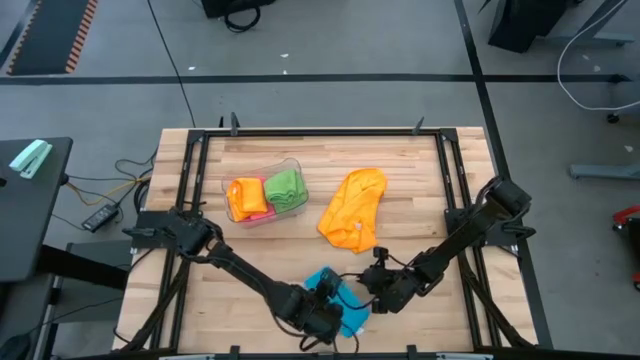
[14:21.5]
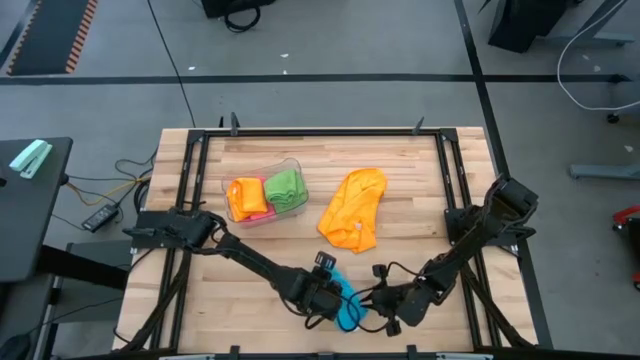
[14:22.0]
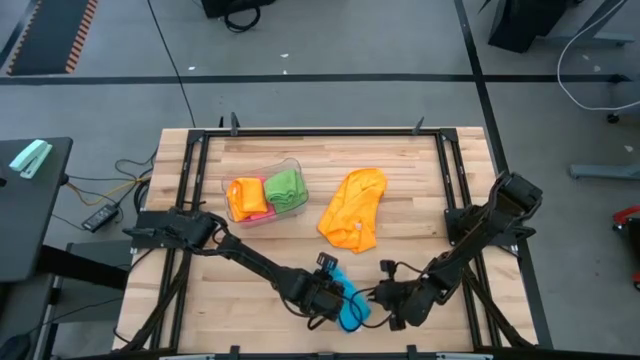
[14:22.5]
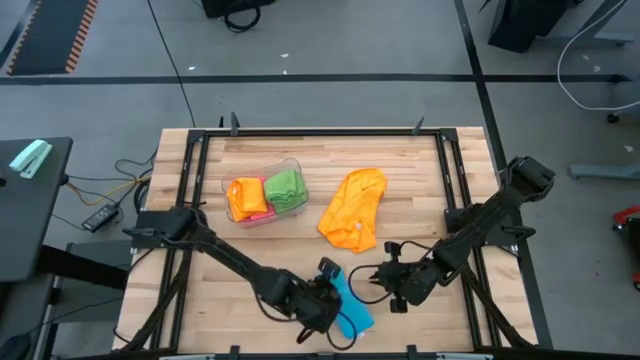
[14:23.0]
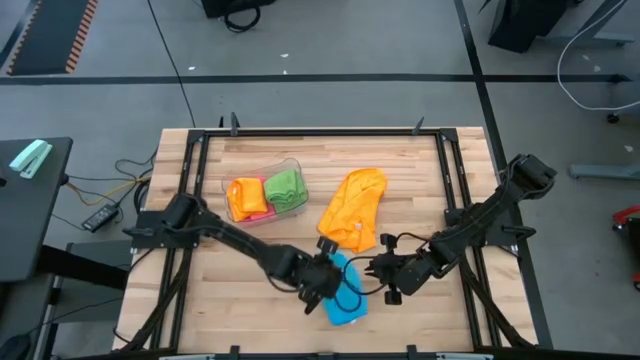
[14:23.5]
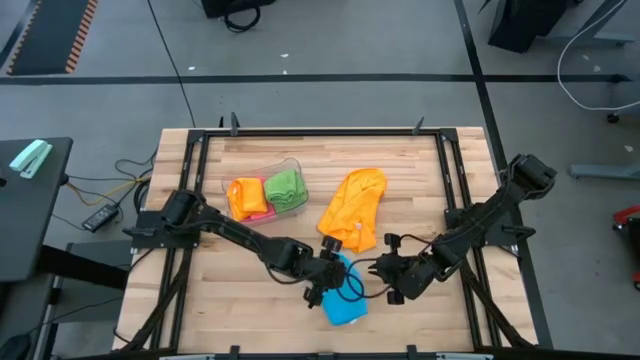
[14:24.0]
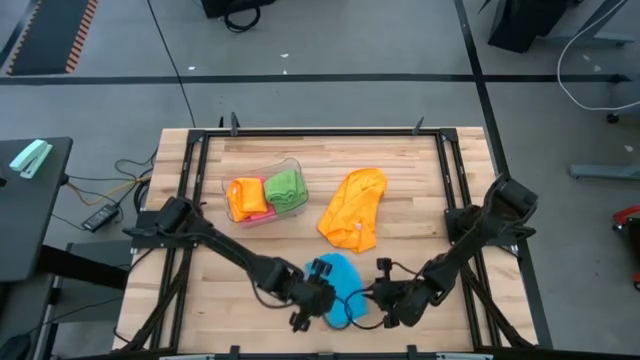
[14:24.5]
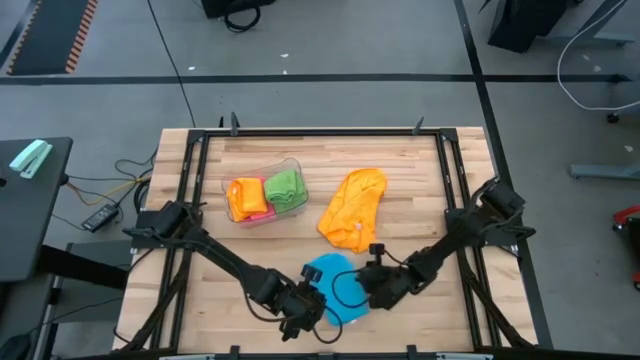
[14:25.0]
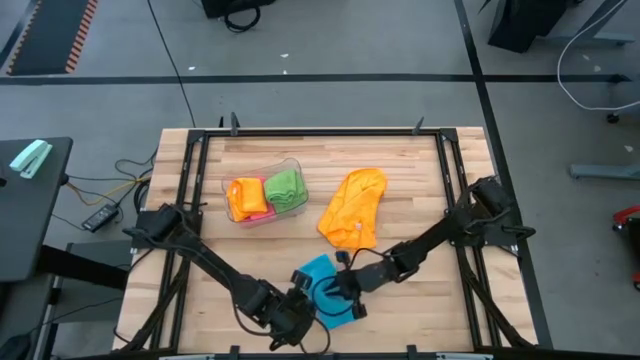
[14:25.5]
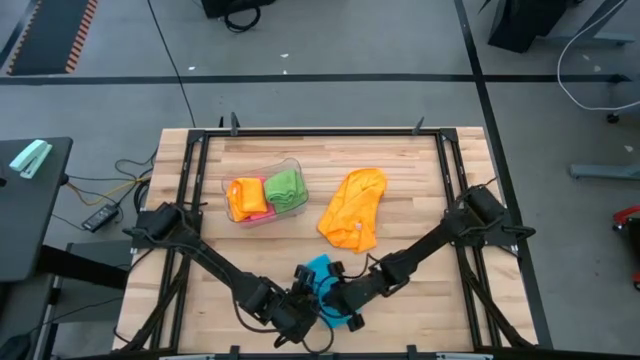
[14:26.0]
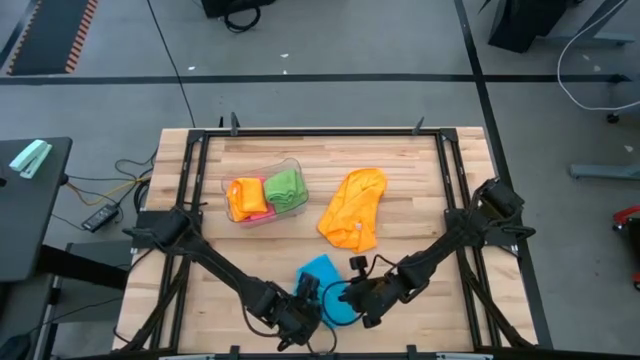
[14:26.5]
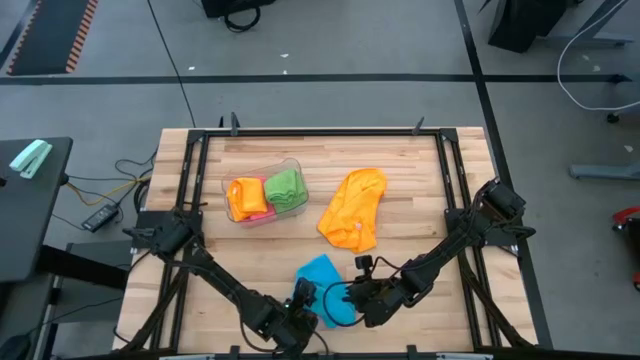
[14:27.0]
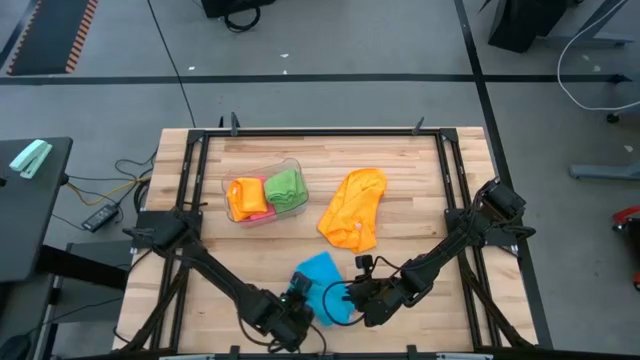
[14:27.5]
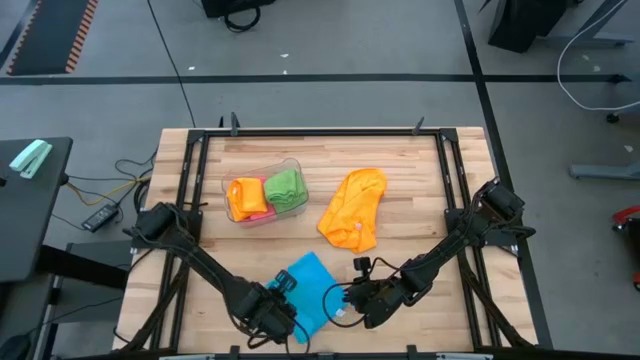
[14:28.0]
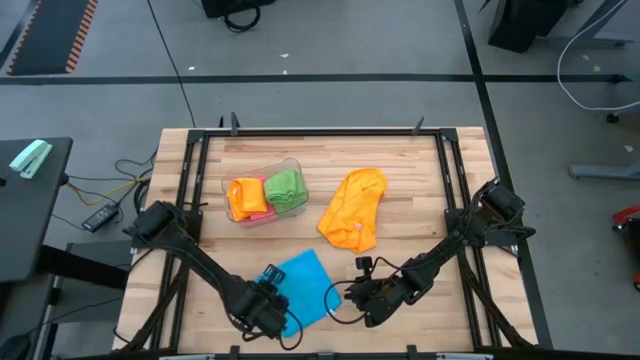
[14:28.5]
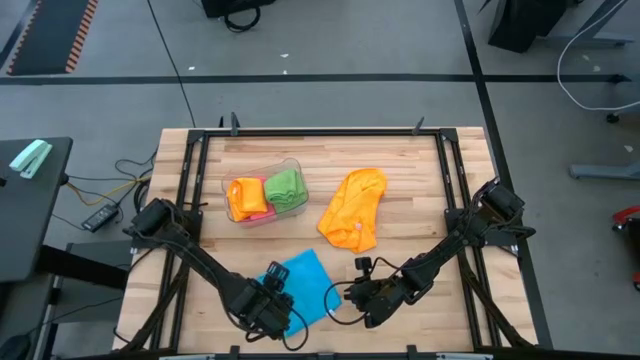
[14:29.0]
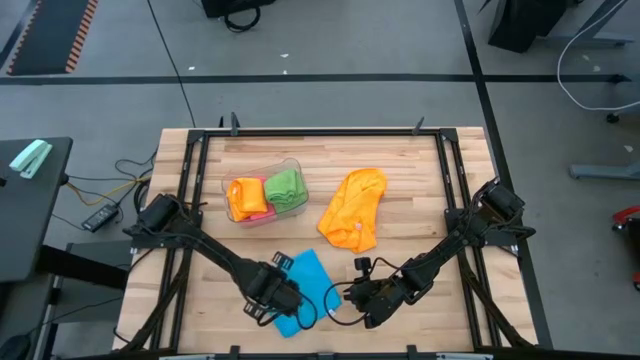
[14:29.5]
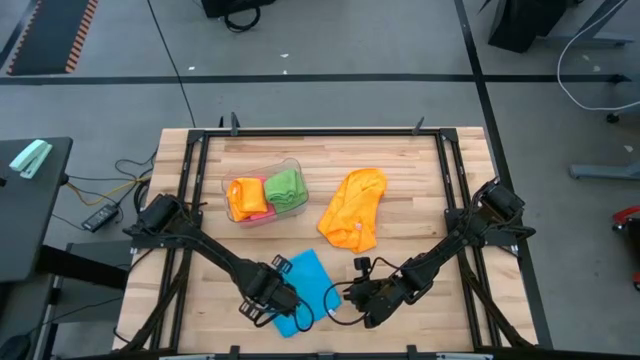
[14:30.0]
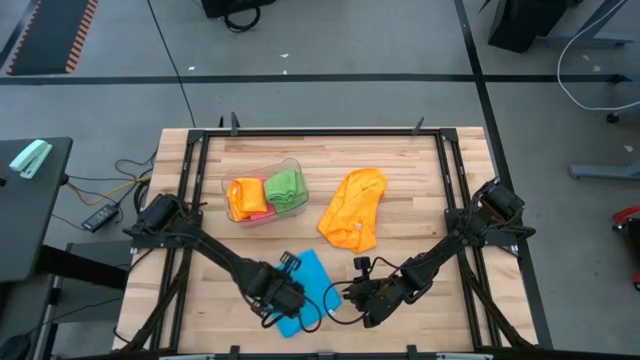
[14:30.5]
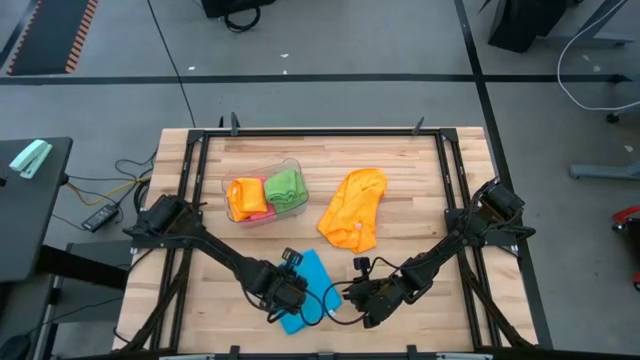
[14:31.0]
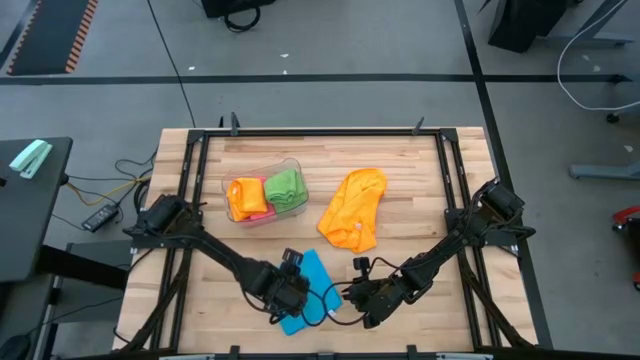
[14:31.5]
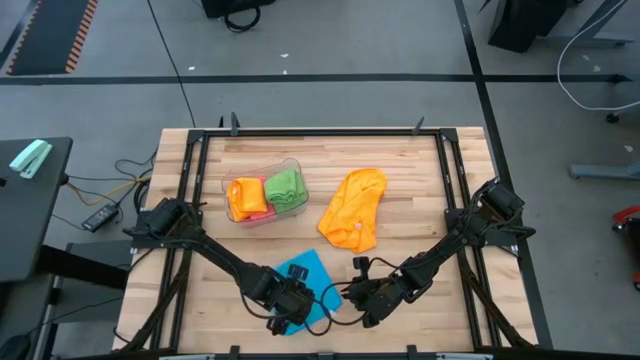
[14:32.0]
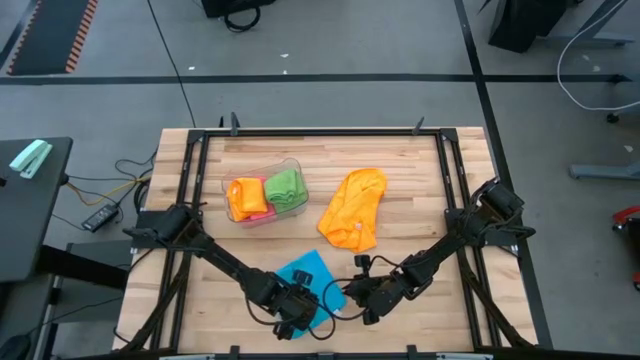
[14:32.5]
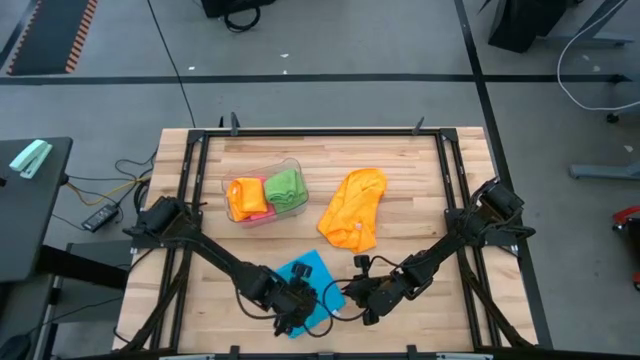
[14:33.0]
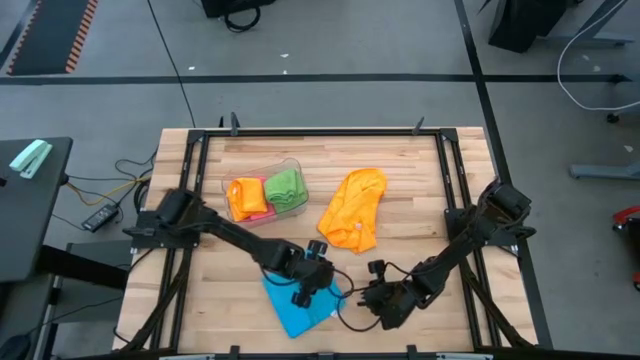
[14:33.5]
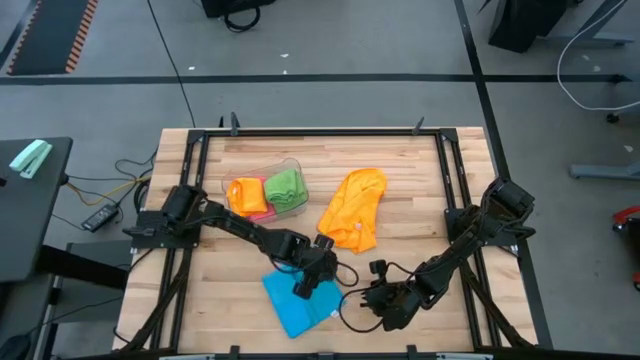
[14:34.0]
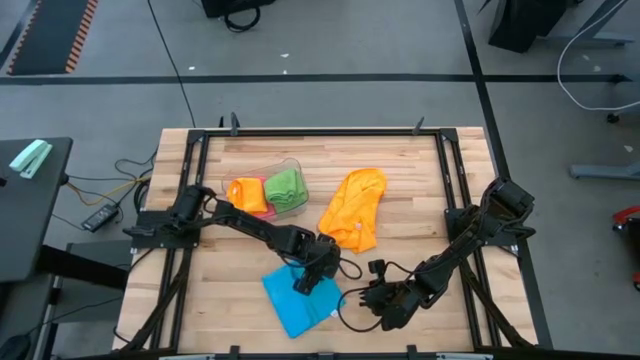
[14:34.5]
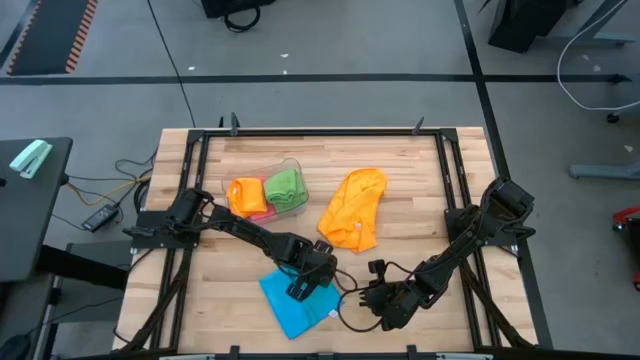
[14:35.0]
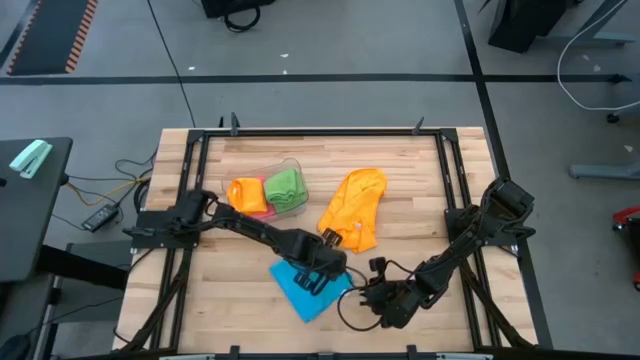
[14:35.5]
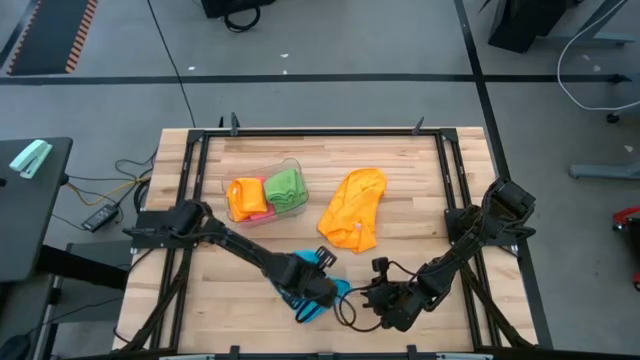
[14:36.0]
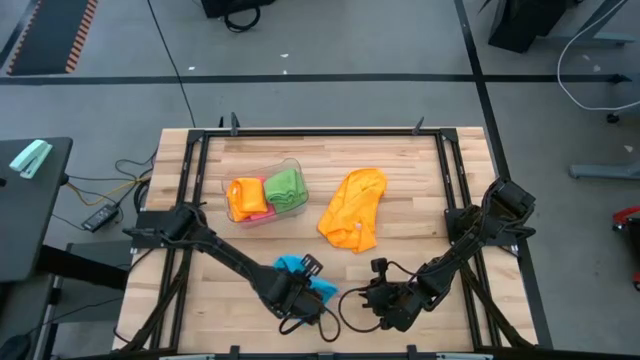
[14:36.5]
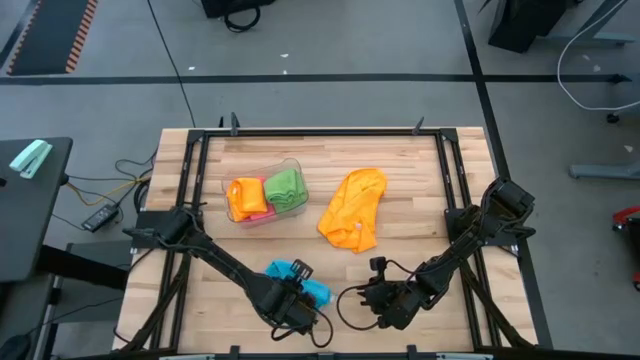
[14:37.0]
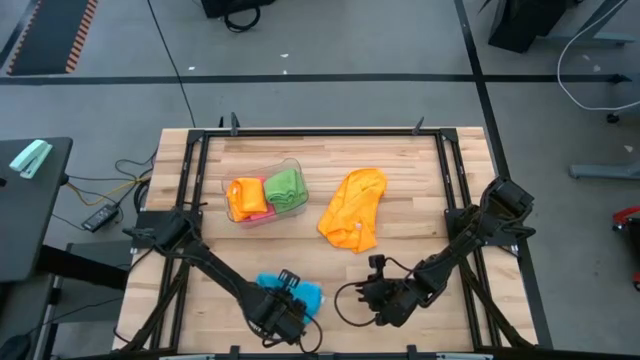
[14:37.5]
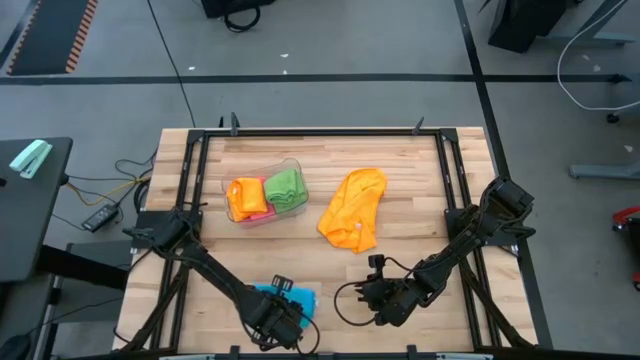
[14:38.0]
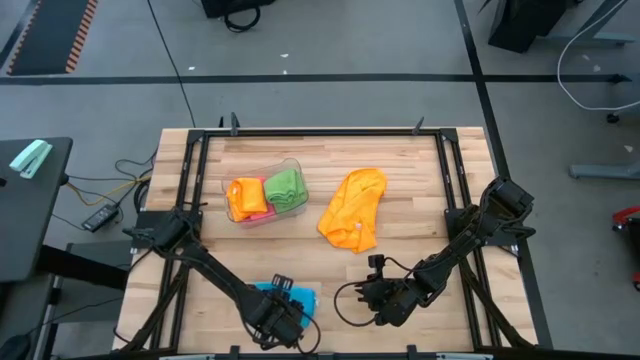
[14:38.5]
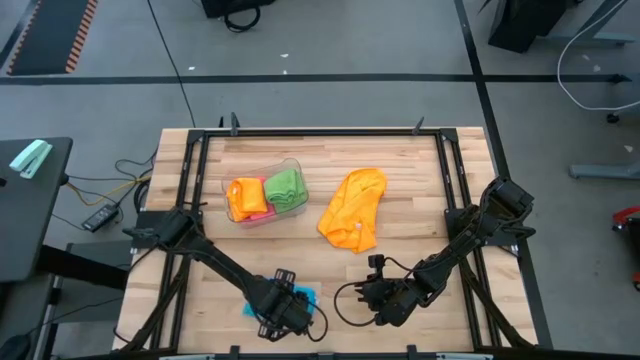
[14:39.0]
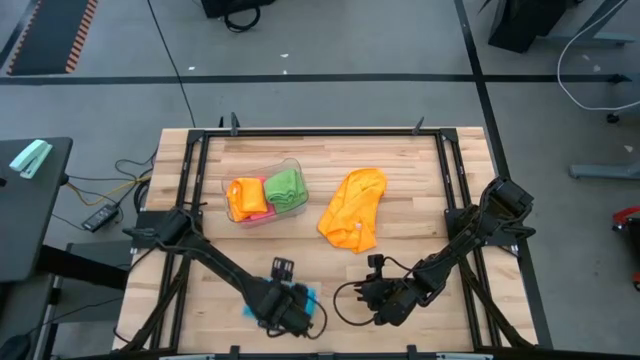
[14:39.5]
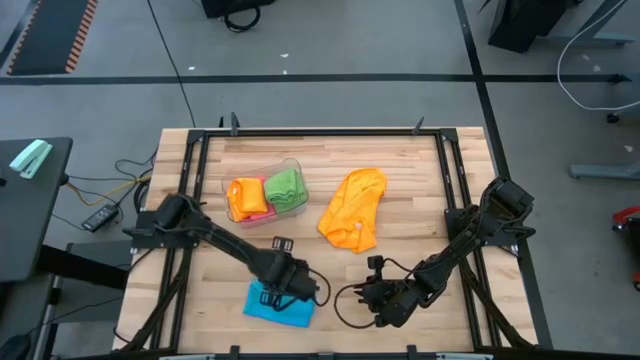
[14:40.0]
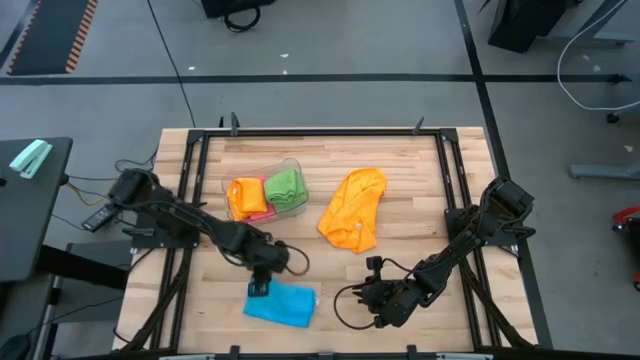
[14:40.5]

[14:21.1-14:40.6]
Task: Fold microfiber towels
Fold the blue microfiber towel
